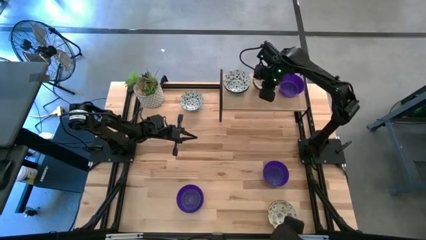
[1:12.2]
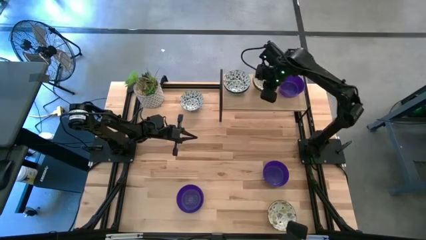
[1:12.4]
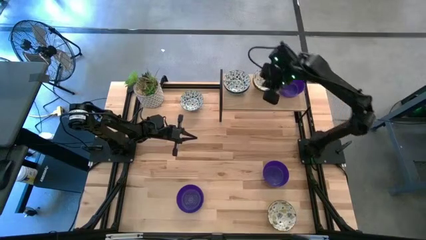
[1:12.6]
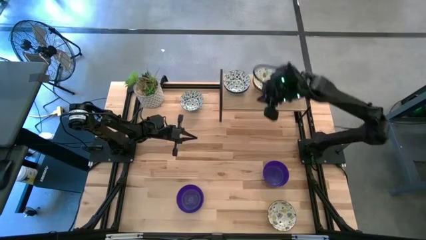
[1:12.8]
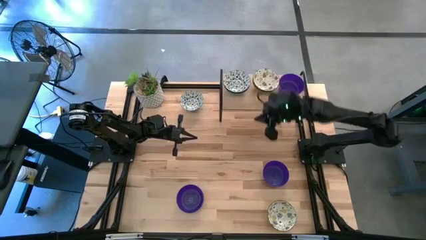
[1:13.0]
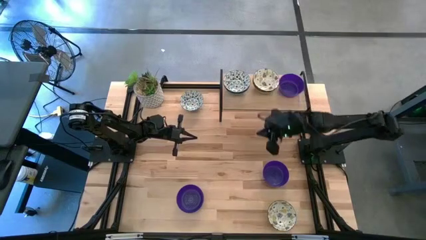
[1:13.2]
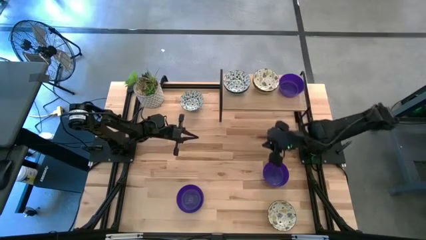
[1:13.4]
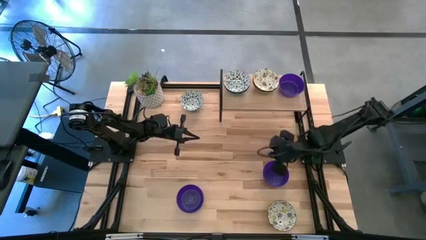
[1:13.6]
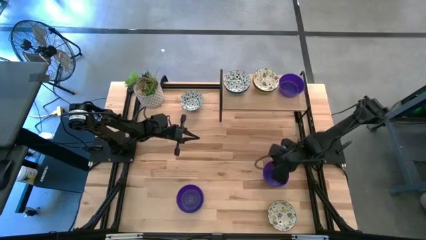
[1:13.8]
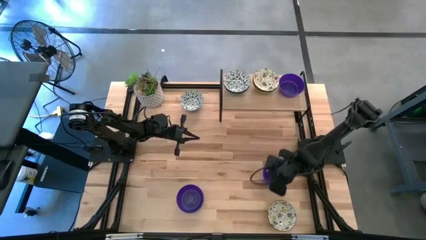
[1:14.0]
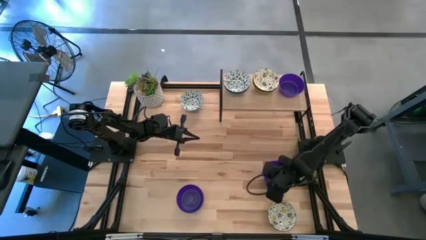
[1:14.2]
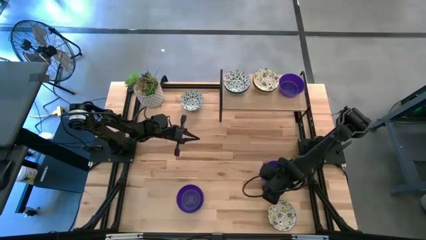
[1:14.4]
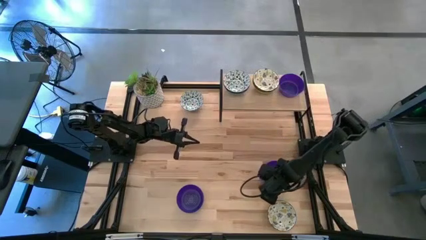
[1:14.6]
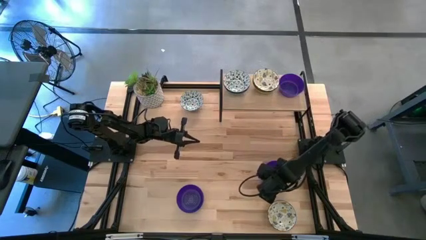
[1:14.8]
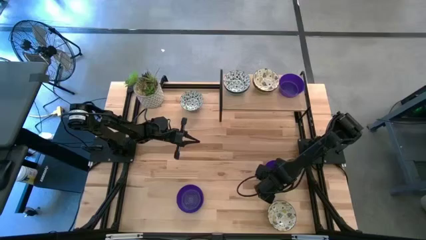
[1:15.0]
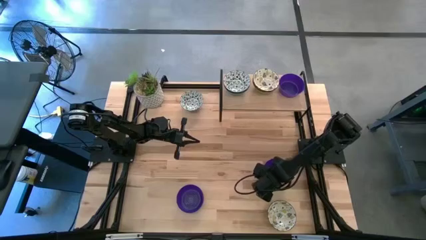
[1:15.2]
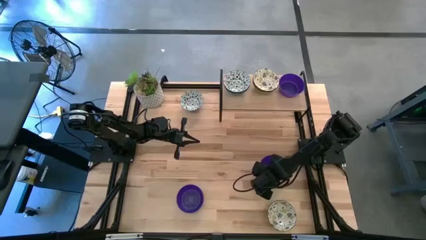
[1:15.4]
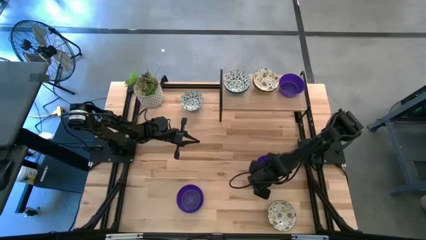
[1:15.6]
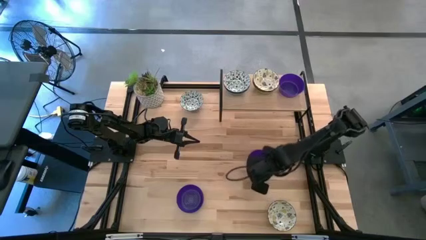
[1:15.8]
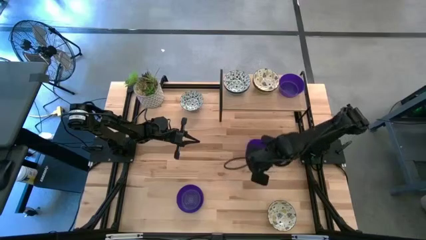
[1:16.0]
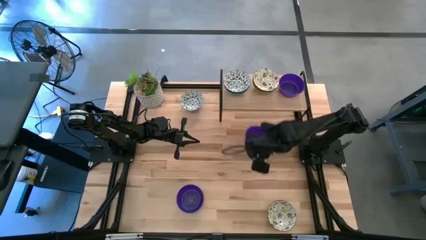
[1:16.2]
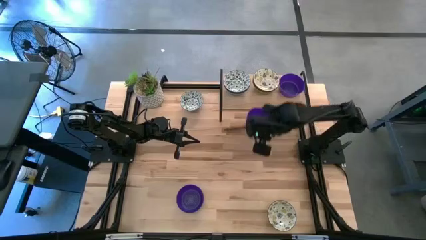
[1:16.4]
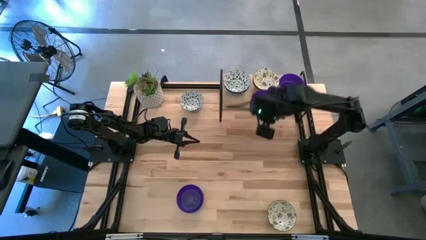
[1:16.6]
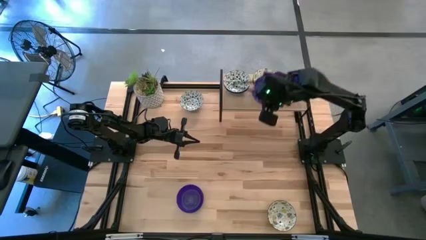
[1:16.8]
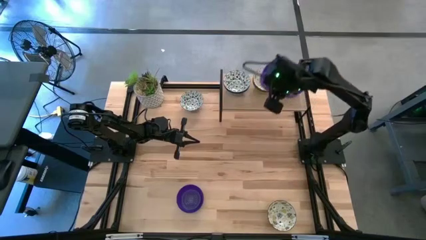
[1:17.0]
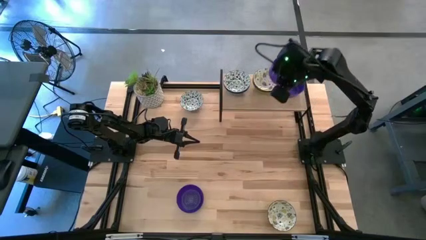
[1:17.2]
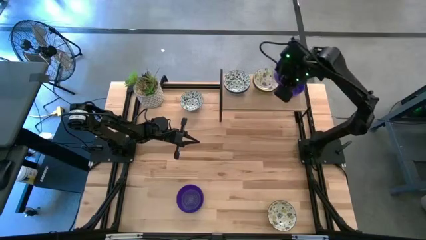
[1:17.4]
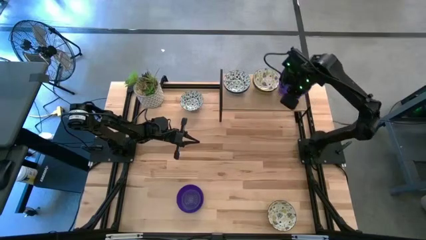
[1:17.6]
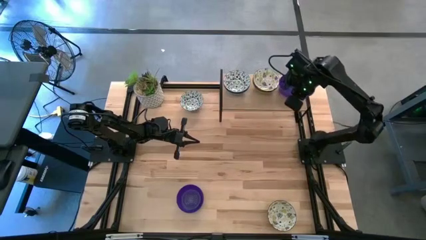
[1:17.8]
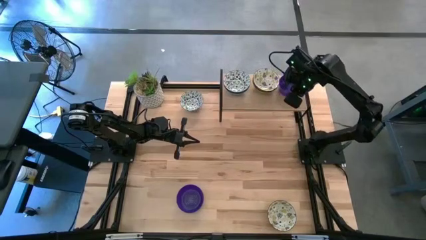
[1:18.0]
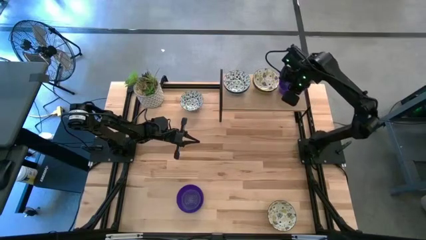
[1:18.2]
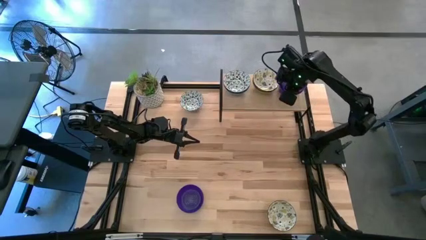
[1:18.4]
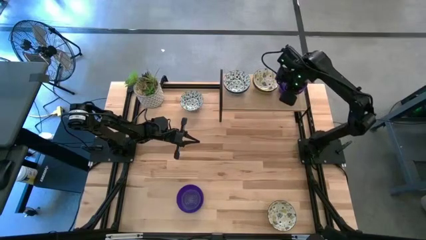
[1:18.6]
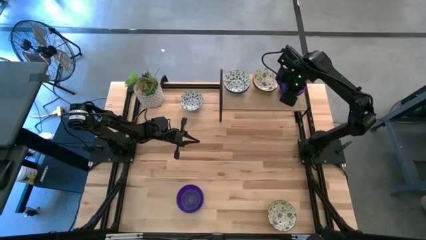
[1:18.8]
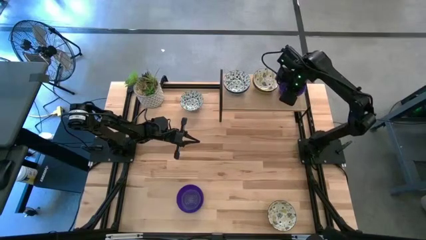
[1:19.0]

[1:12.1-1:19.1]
Task: Pick & Place Mini bowls
Stack the top violet bowl on the violet bowl on the shelf

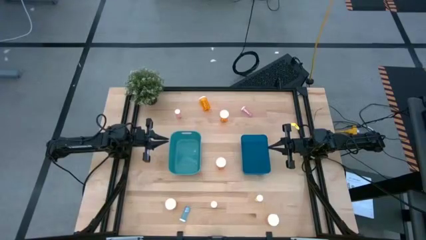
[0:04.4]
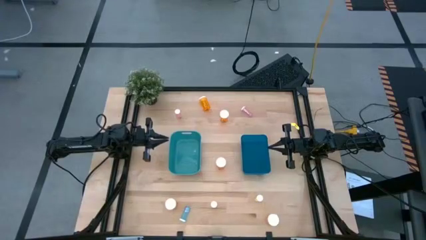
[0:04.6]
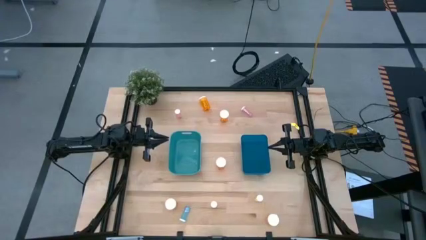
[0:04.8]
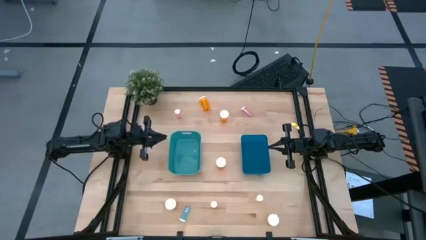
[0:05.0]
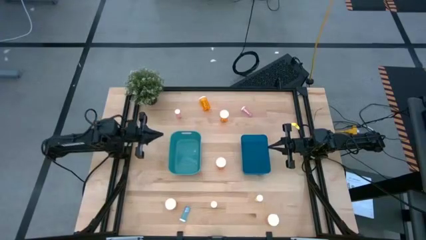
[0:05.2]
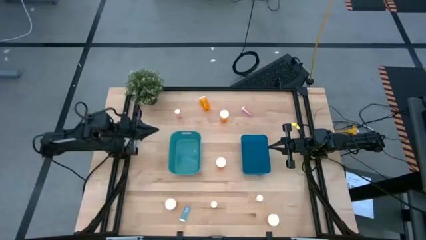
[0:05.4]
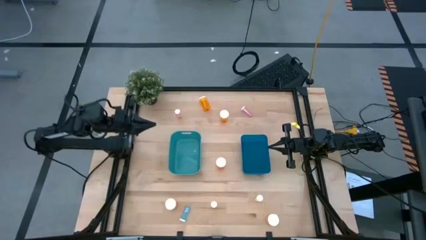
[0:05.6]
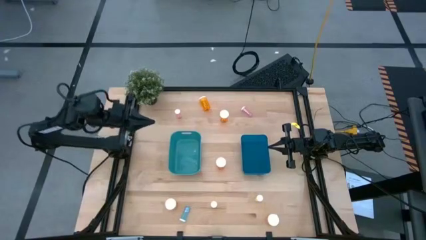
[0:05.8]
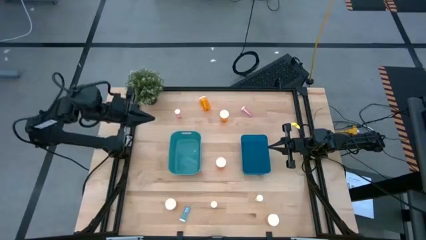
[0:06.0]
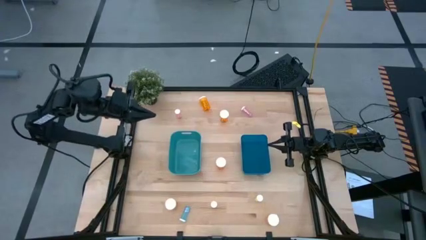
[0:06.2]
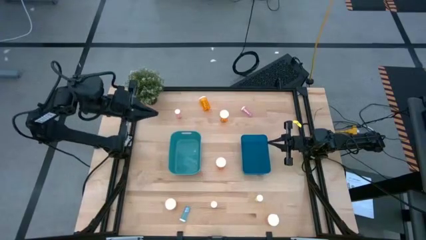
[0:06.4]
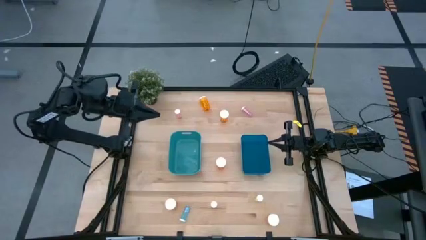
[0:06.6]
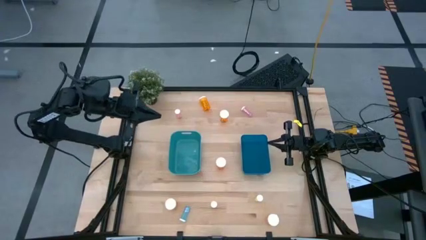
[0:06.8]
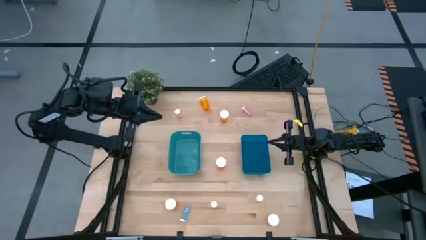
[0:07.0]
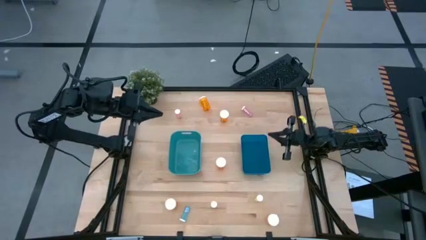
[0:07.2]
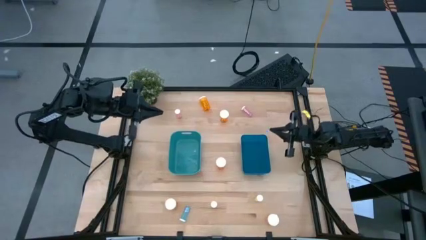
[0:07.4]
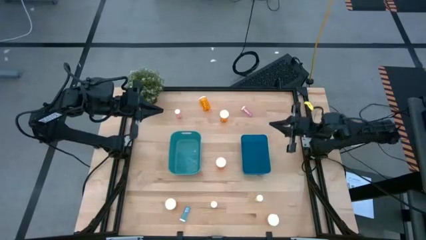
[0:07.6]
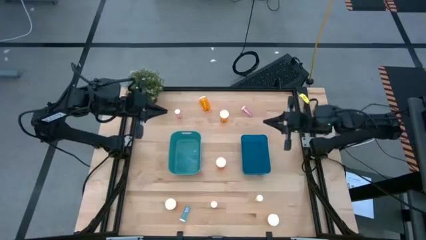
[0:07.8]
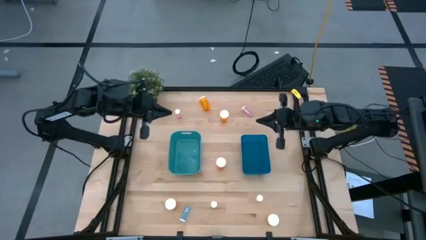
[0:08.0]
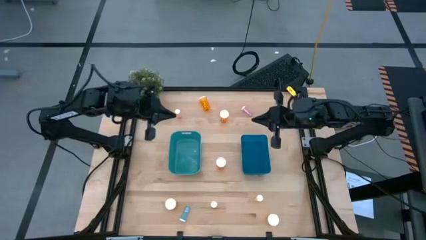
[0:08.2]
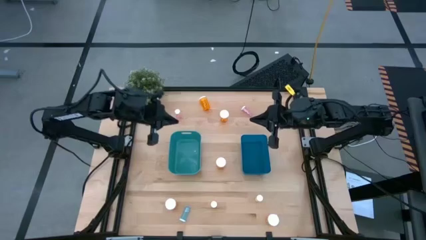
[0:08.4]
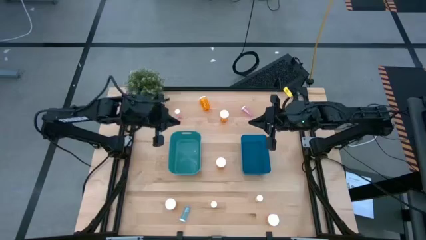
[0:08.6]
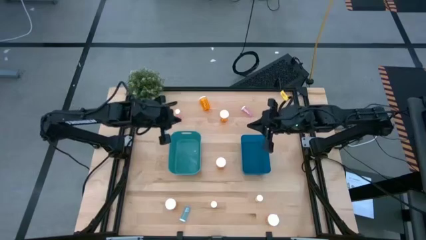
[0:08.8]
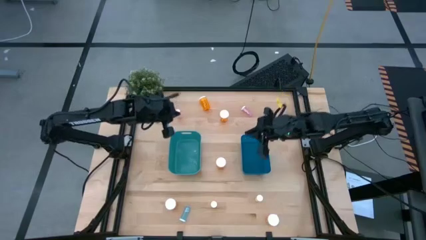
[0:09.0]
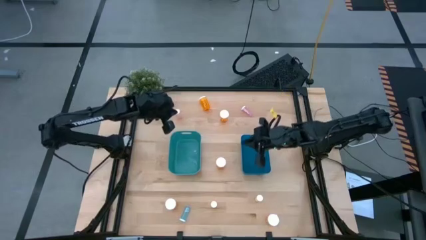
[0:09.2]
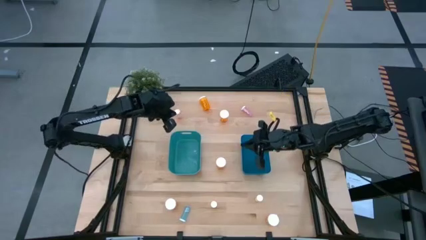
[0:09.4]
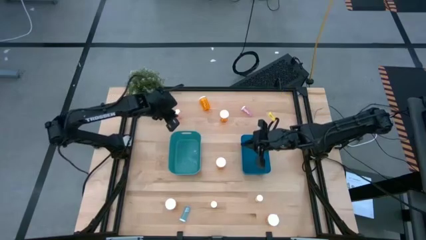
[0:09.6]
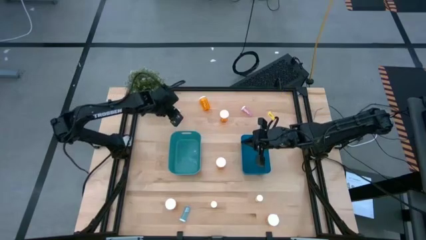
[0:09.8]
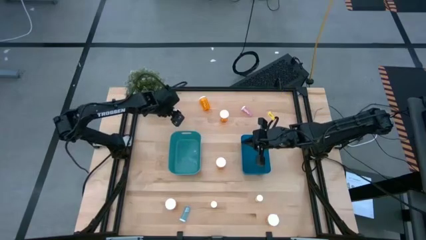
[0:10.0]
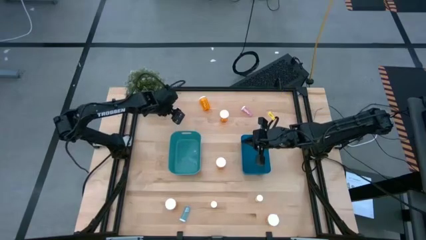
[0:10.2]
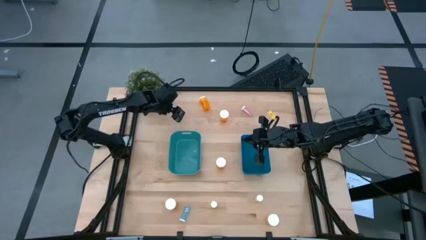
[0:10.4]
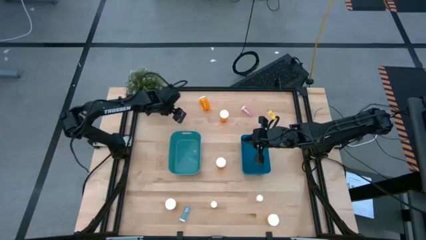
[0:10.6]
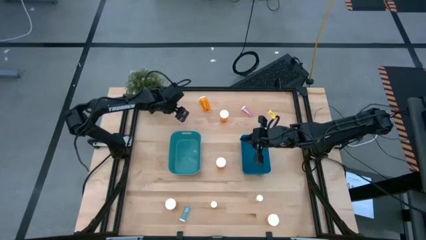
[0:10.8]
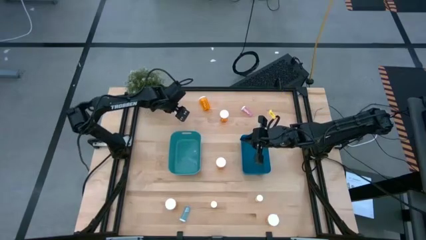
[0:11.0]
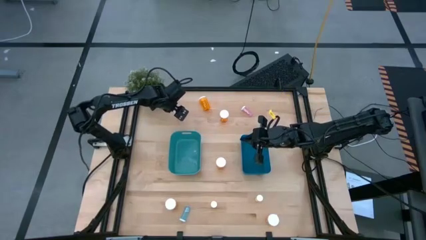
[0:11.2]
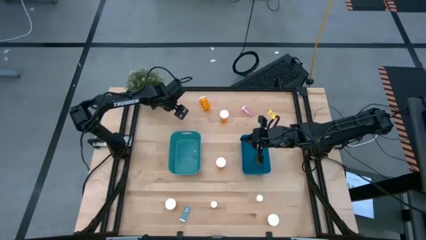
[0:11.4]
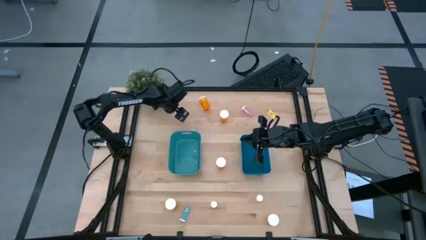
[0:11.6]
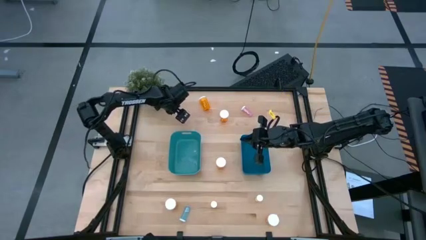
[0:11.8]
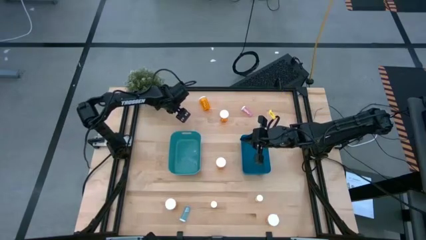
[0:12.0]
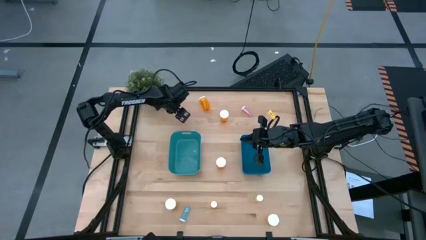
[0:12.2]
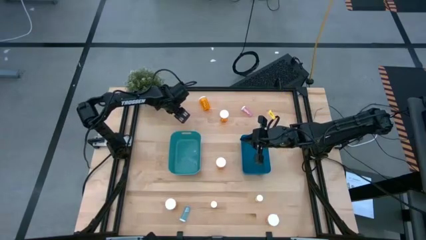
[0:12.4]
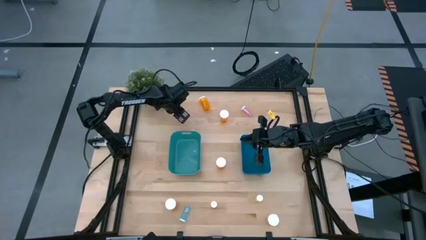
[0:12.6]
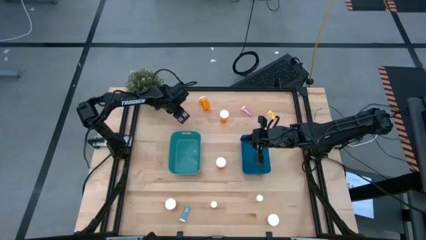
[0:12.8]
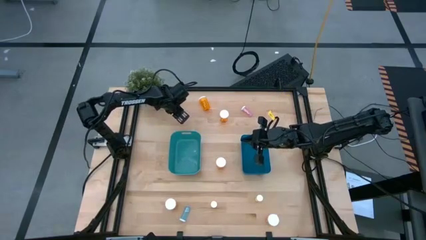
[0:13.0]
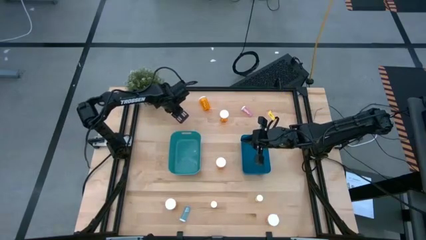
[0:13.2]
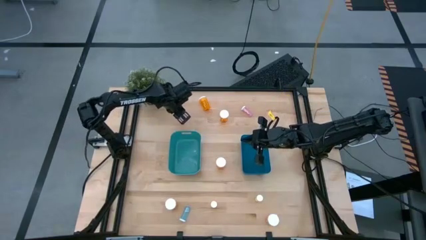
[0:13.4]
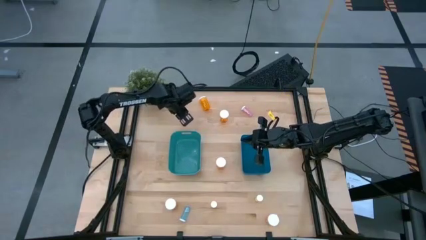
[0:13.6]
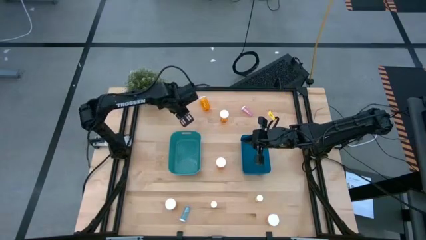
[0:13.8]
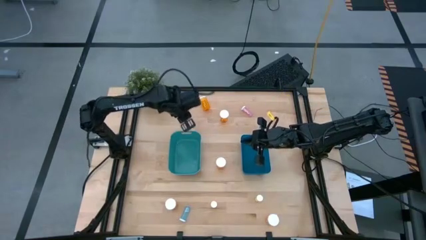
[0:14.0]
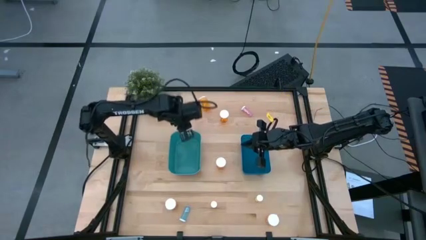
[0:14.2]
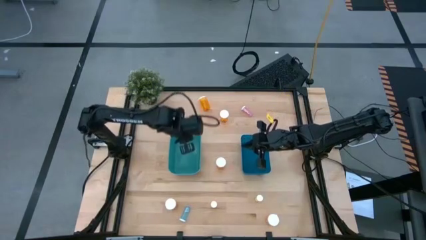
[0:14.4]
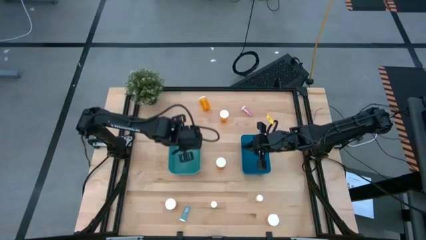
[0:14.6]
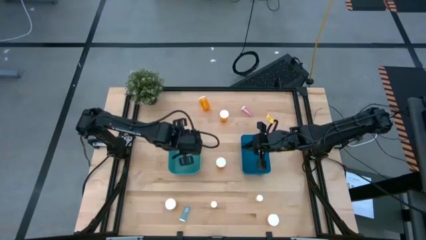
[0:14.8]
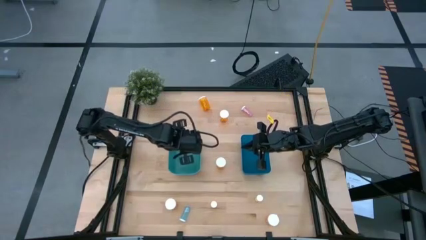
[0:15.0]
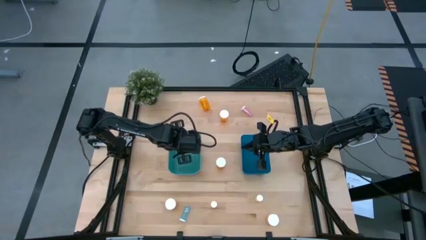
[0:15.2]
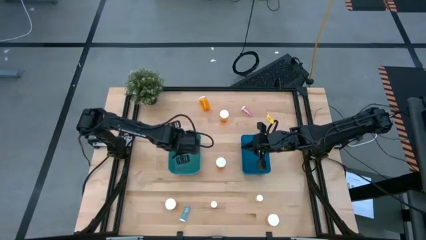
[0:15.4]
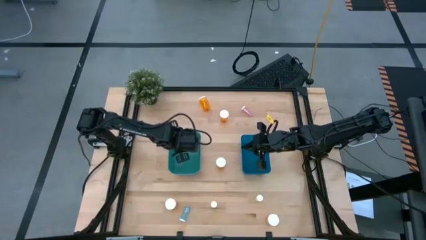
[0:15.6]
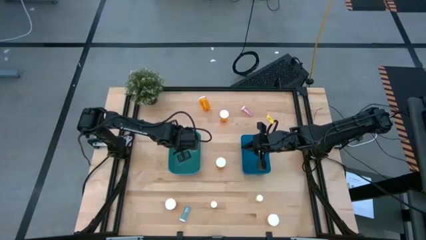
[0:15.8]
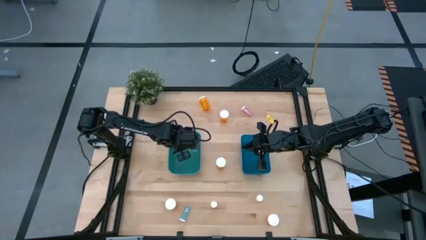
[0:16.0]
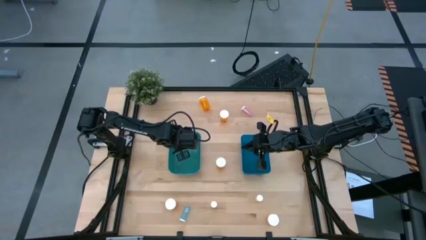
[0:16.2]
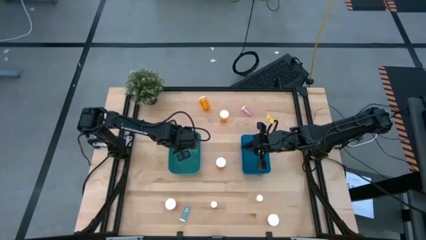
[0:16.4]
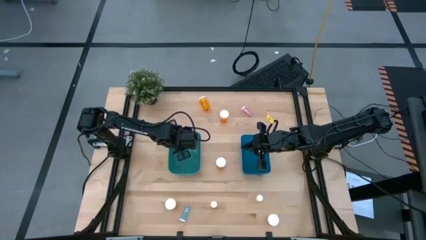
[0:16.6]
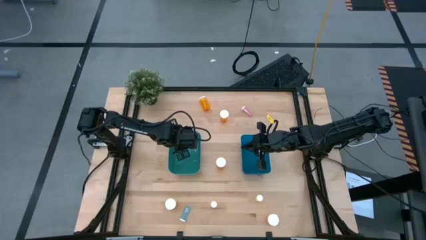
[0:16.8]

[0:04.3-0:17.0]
Task: Pick and place medicine bottles into bin by pill shape (circle, oval)
Put the top left small pink pill bottle into the green bin
